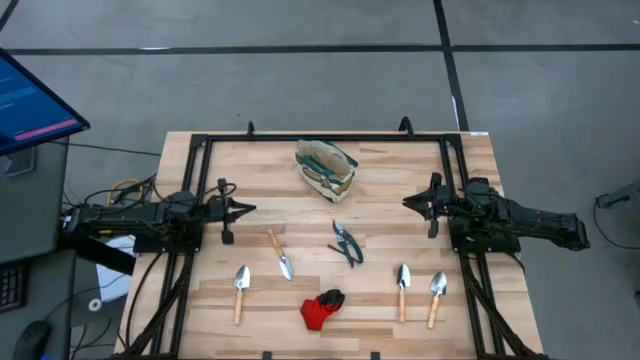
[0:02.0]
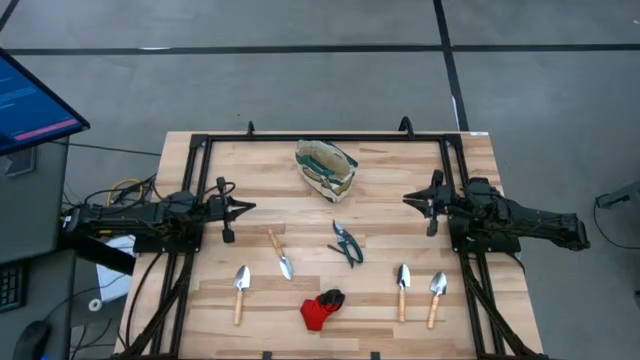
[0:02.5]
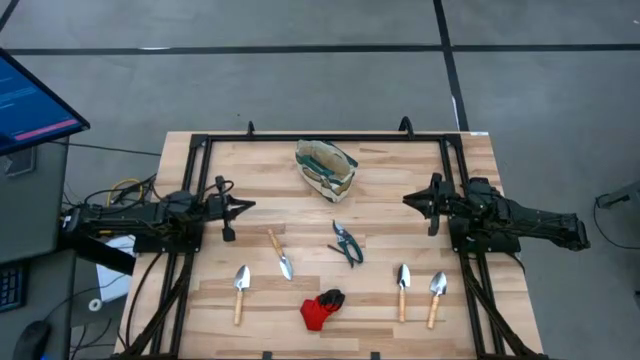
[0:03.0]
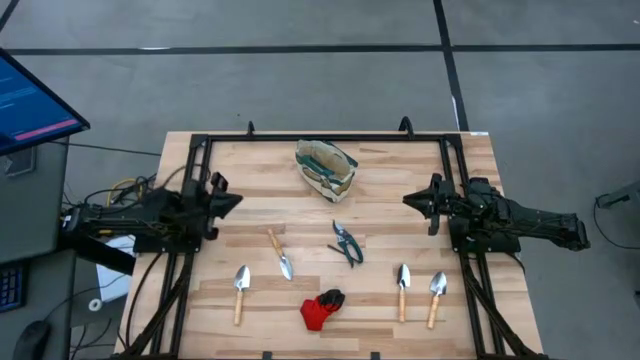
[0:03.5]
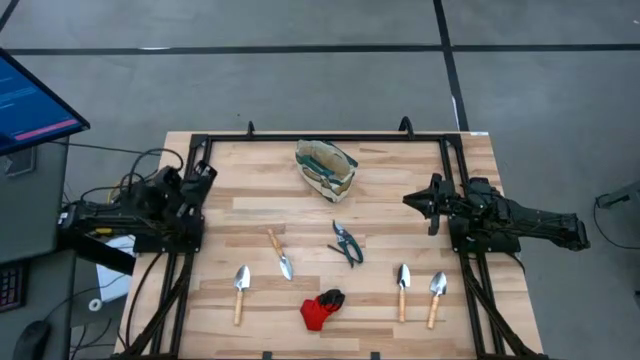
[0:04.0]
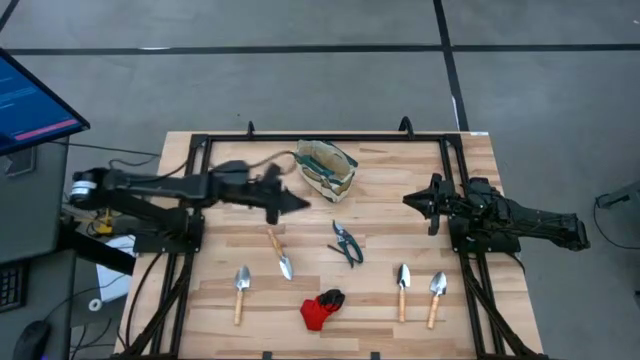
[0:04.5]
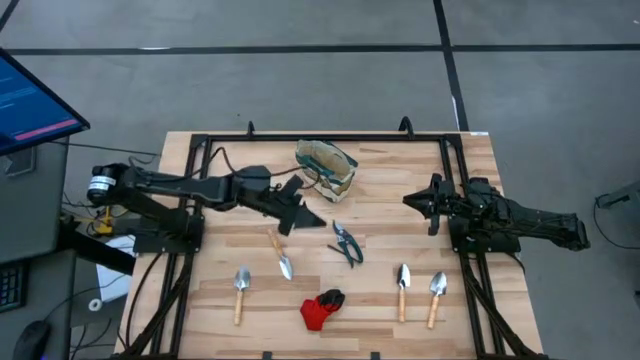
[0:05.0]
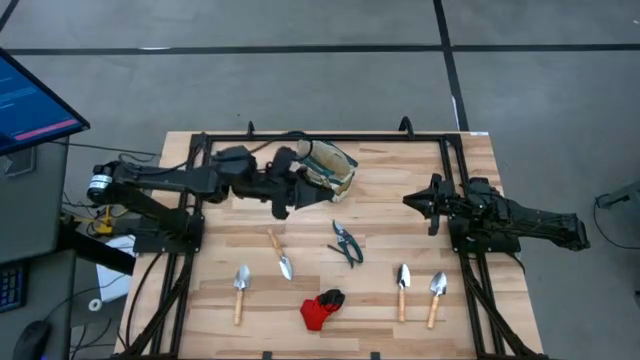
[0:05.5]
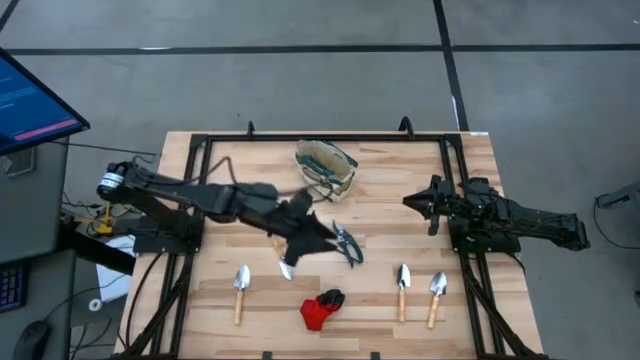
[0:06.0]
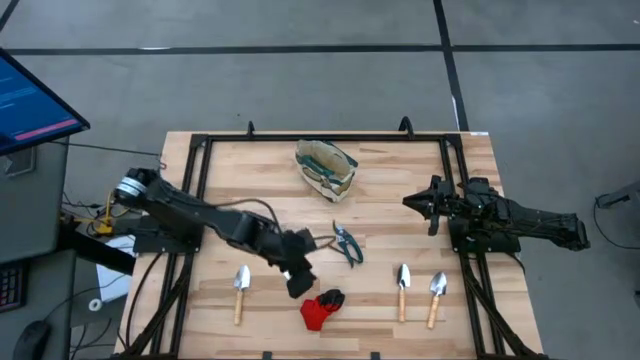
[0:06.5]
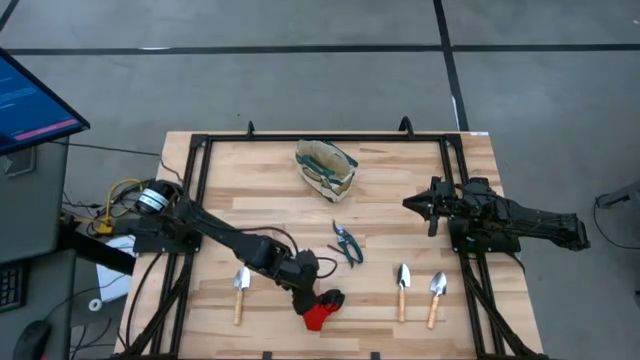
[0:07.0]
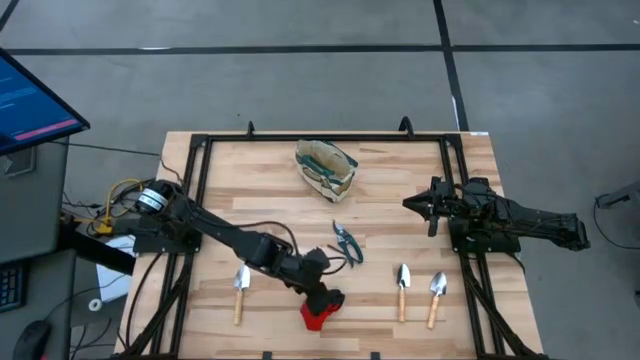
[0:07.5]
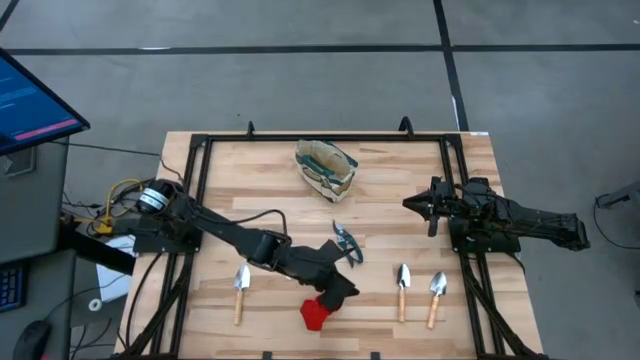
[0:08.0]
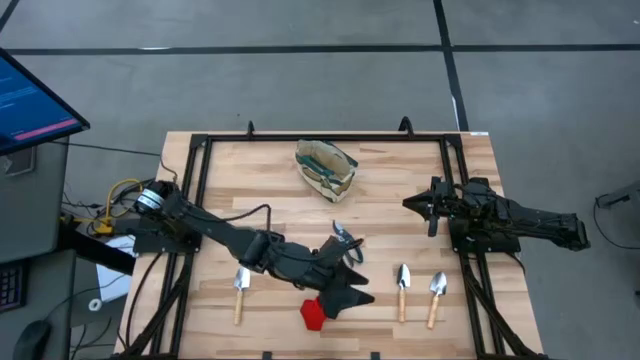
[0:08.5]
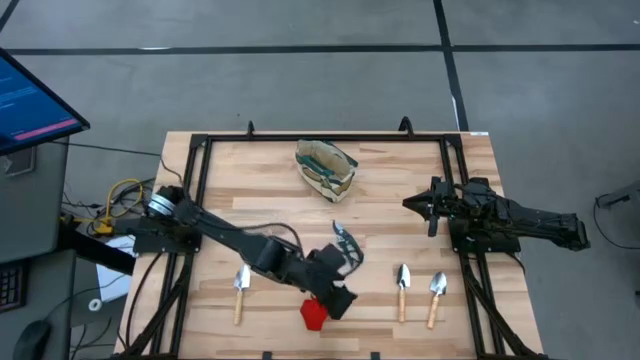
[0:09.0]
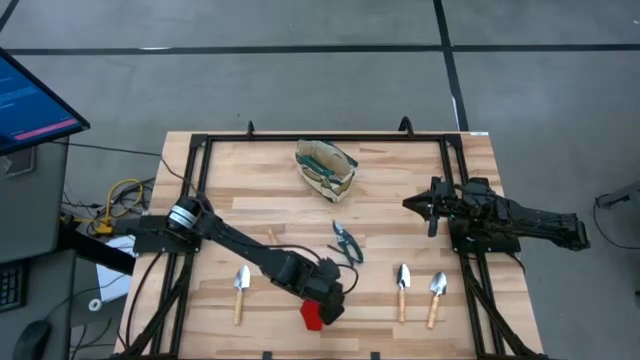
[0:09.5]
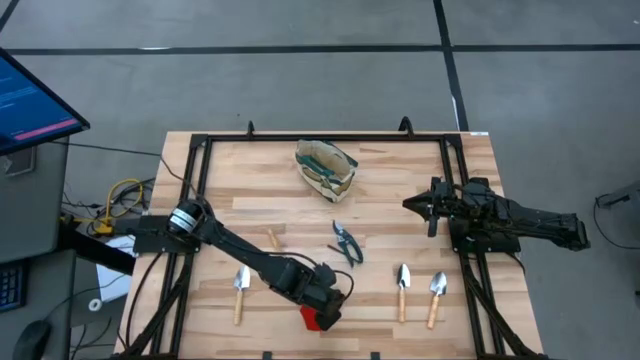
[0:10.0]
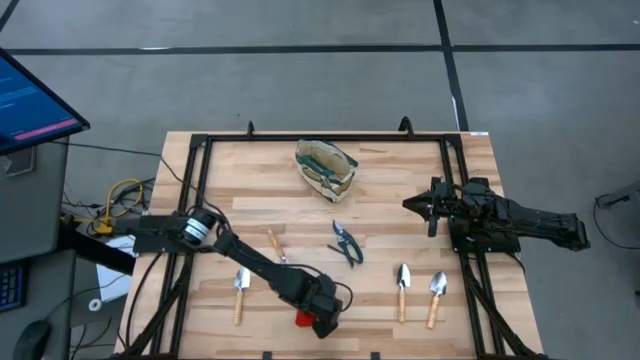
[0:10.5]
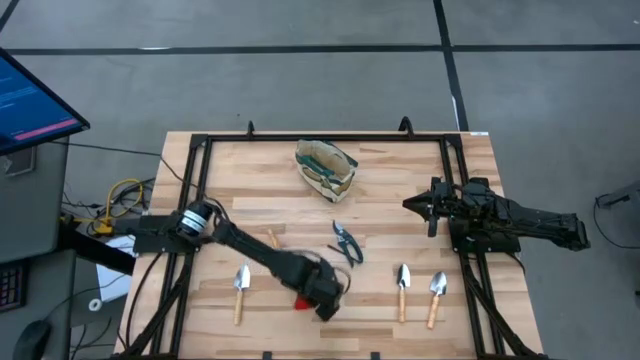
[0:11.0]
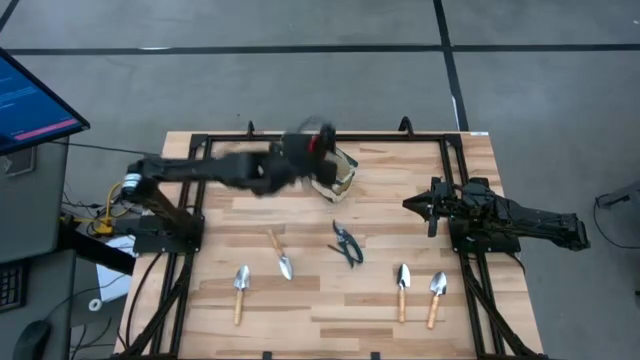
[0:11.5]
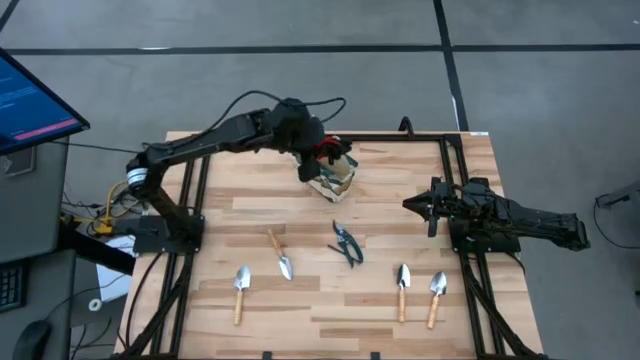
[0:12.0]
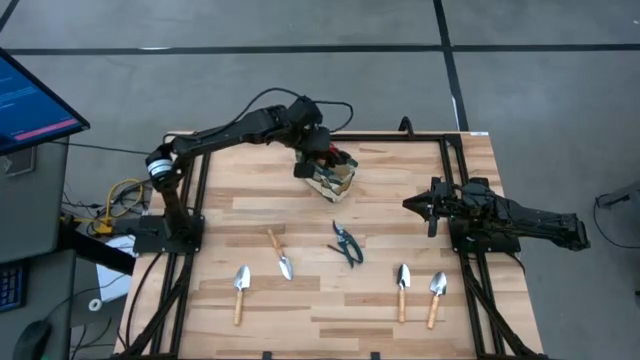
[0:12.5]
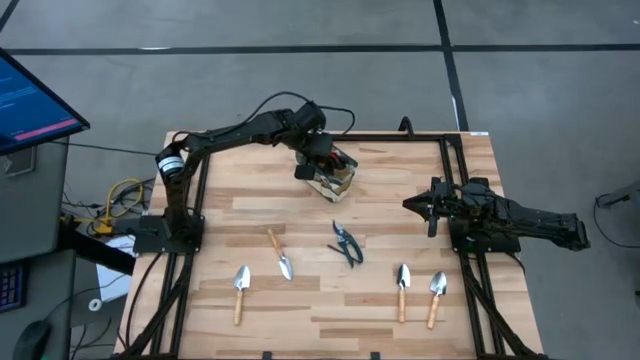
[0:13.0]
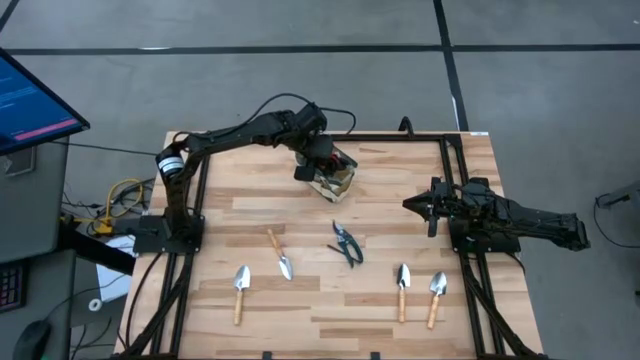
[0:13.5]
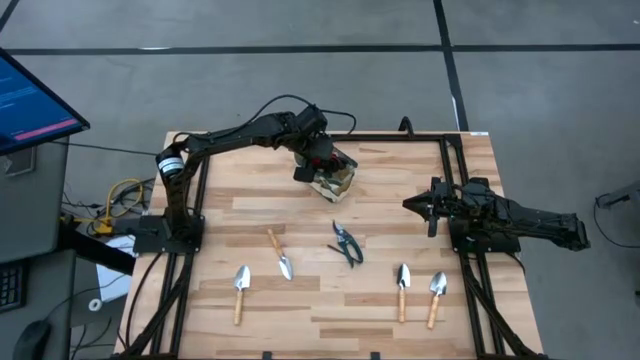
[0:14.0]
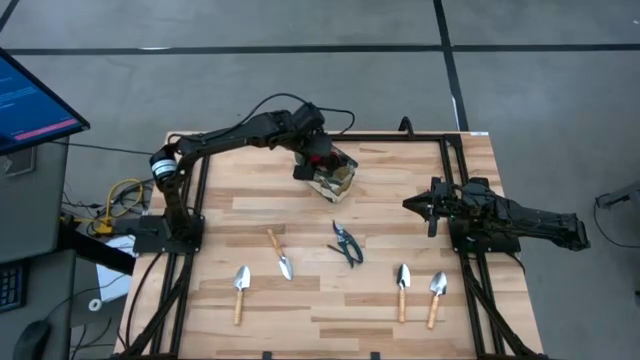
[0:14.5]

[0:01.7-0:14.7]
Task: Pick & Place Garden tools in Gardening bag
Put the red gloves into the gardening bag

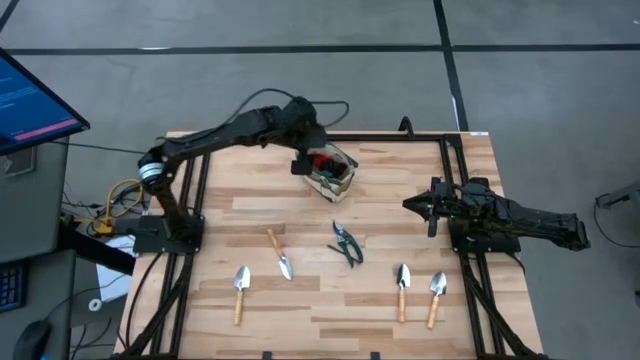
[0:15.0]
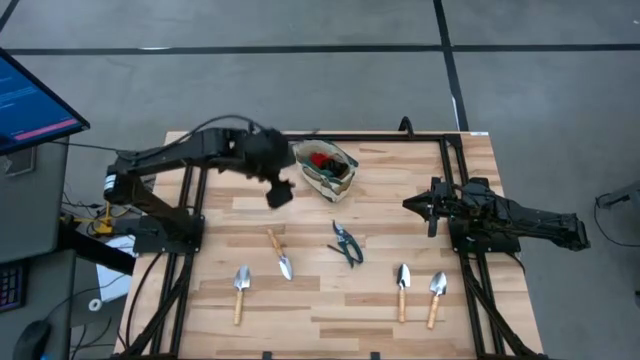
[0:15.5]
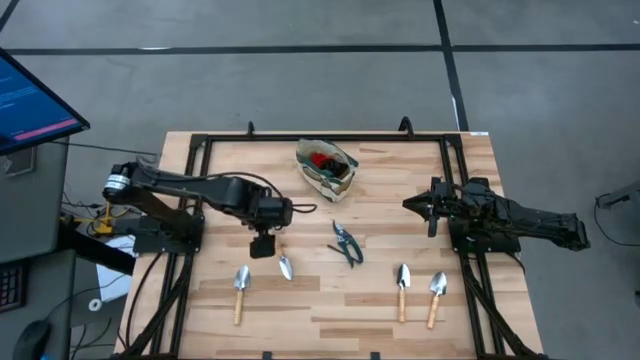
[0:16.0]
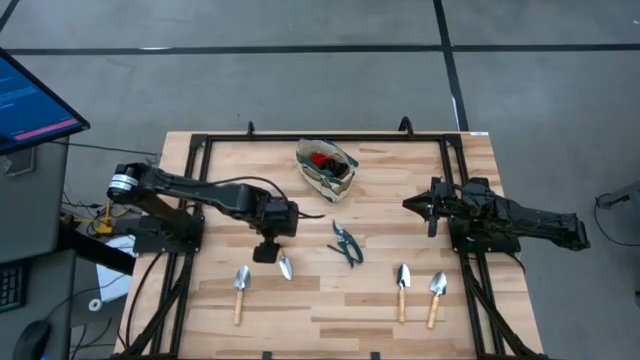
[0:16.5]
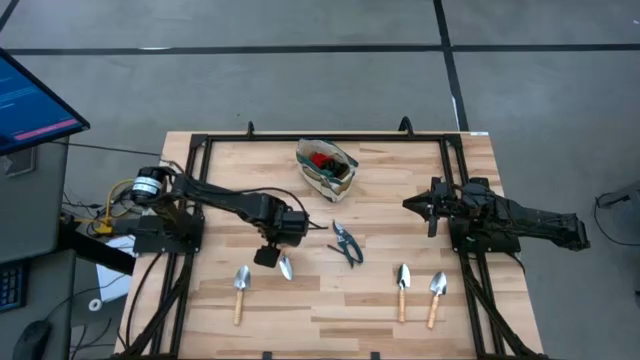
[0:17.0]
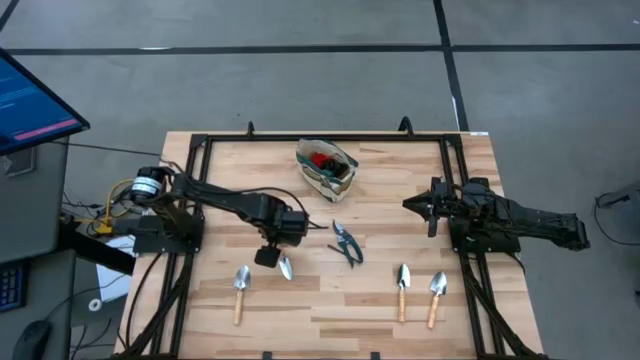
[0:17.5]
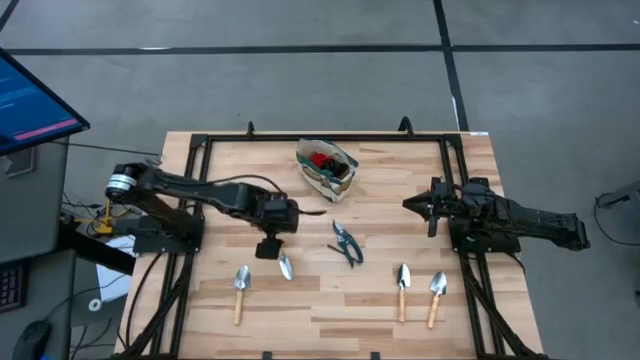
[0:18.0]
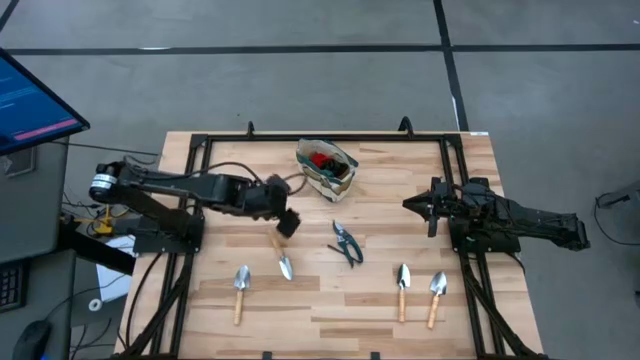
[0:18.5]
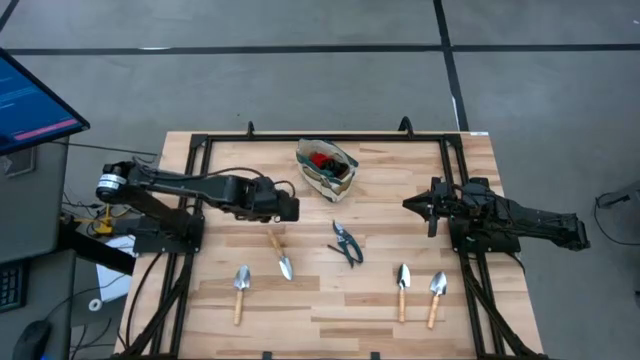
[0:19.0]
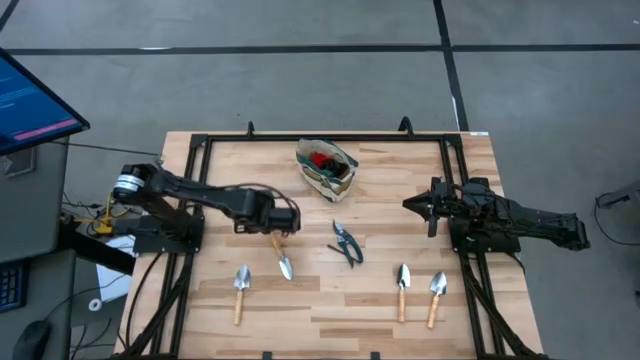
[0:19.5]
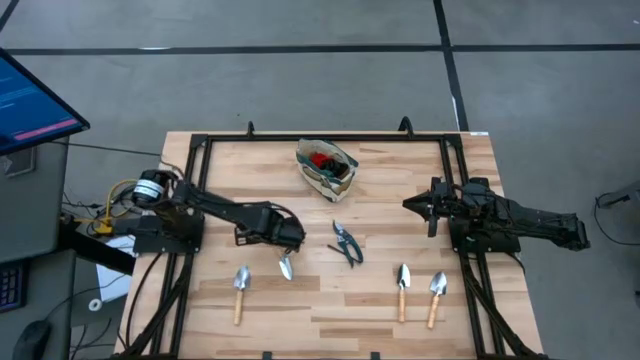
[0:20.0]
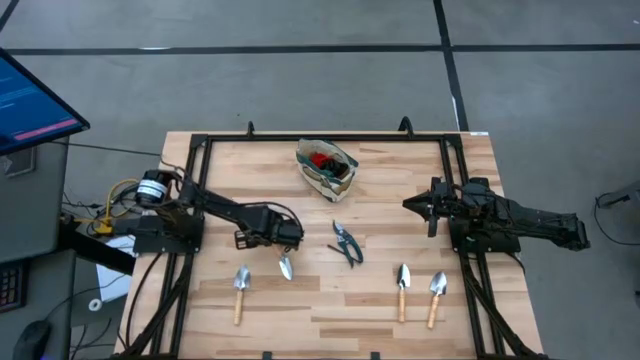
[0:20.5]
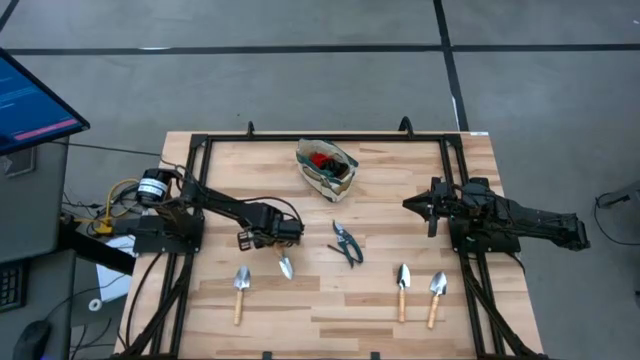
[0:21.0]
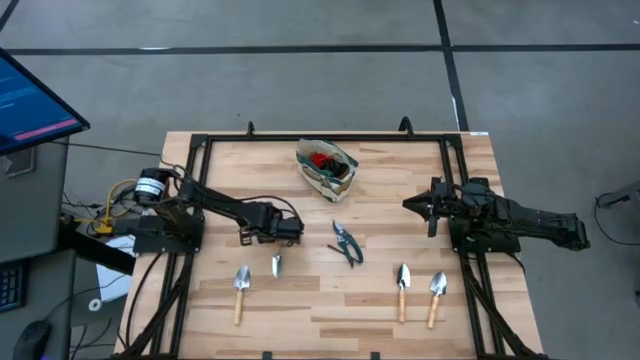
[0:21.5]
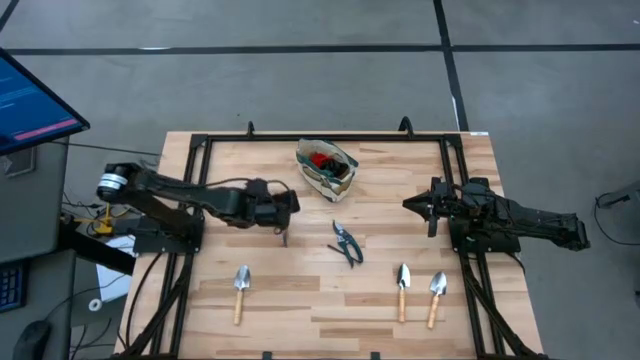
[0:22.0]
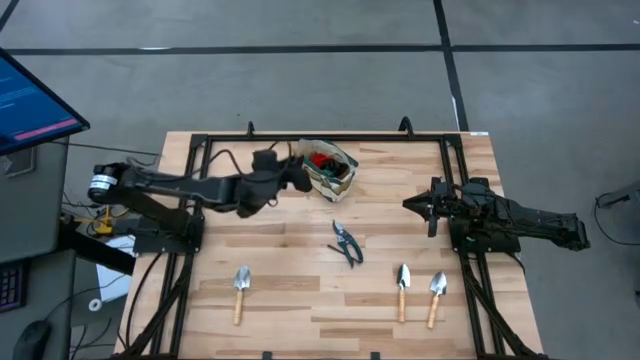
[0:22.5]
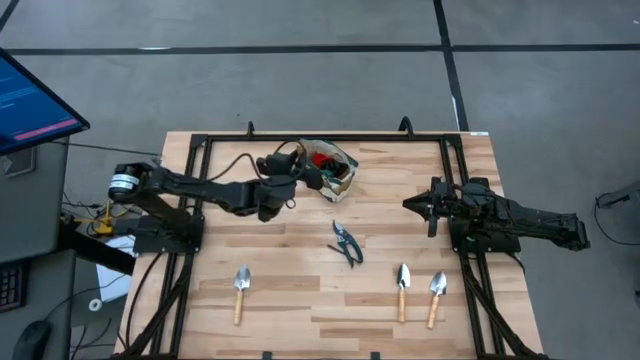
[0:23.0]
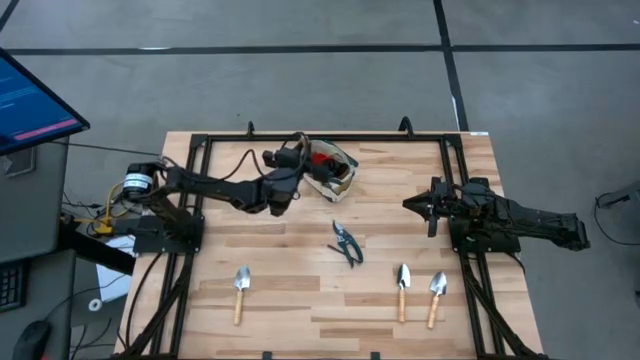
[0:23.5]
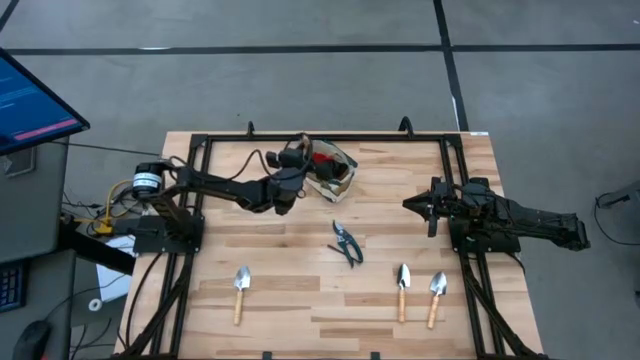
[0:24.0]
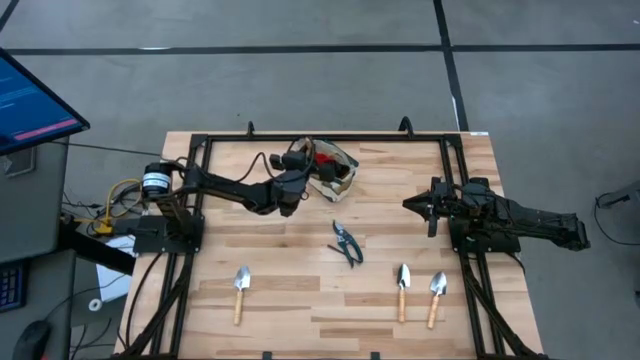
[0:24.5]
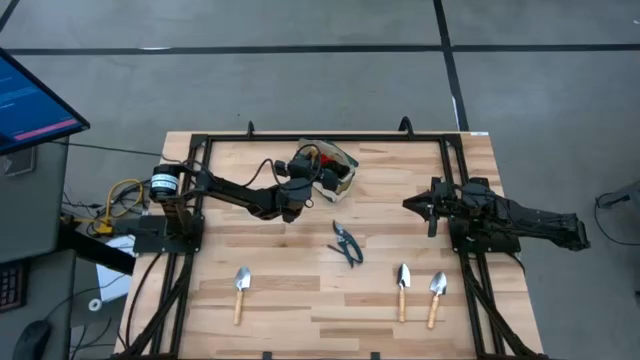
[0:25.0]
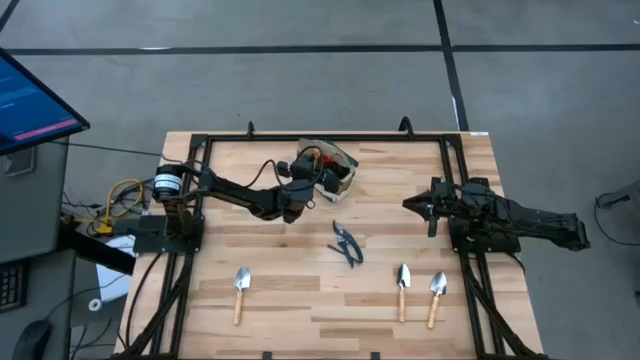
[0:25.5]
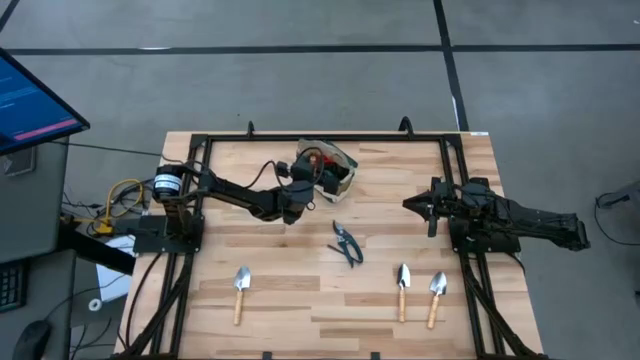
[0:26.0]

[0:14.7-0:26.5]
Put the brown trowel into the gardening bag
